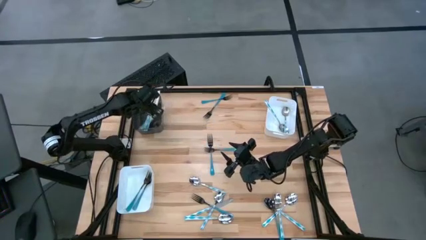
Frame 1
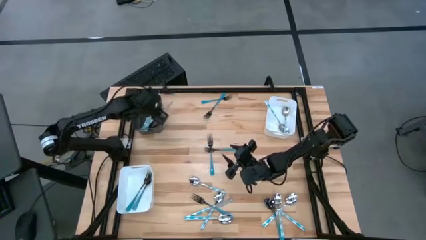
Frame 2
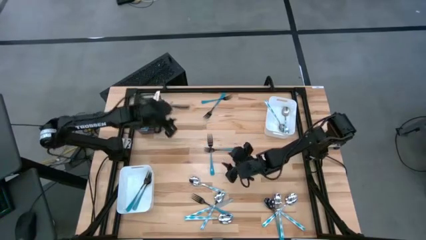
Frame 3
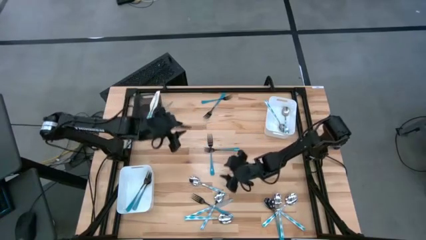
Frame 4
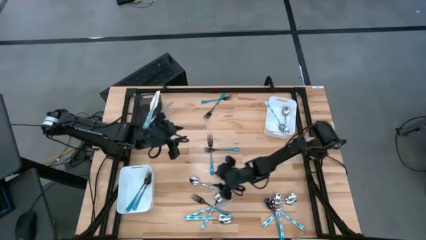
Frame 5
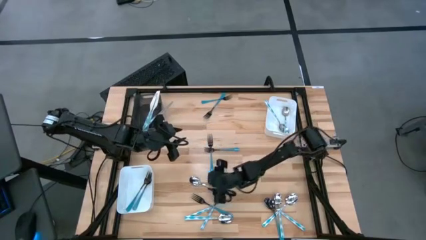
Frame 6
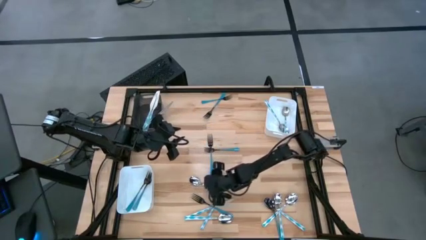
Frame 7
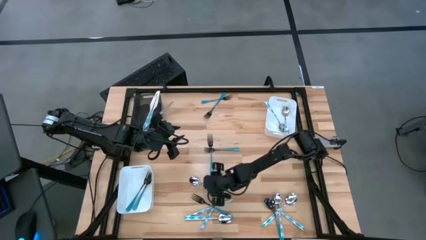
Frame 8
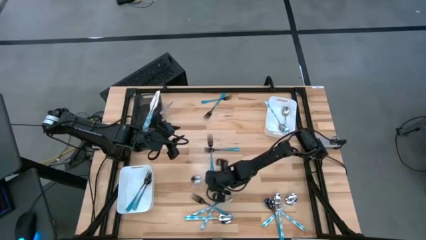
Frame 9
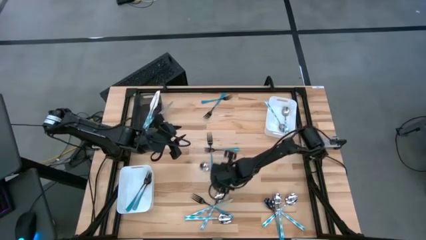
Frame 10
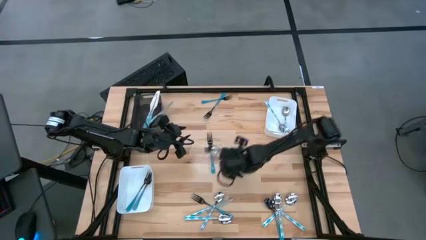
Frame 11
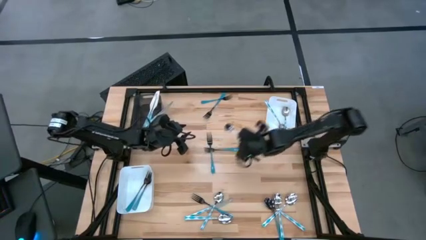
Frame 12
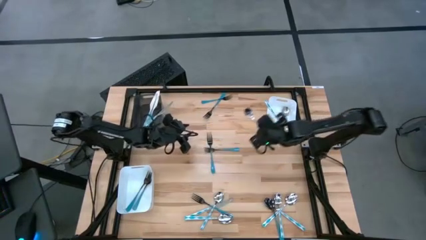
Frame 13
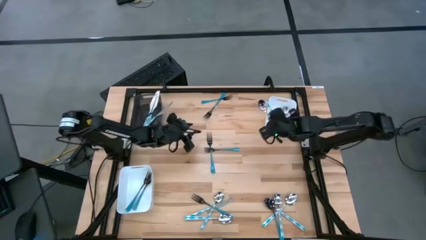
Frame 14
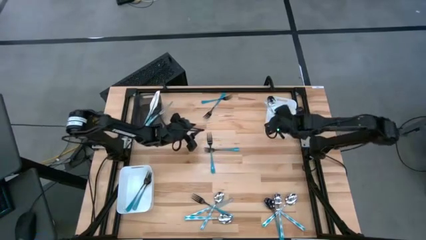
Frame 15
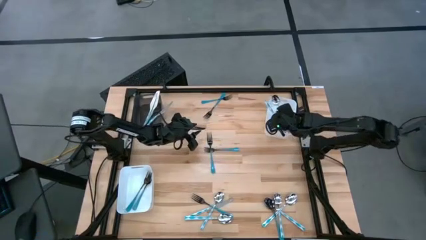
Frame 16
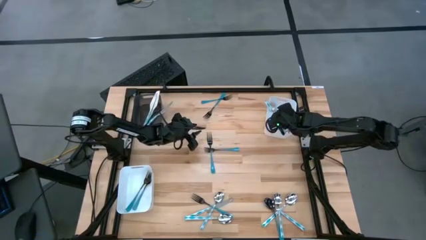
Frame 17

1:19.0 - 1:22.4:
Task: Sort silverware by color (type)
Put the blue white spoon into the right white bin

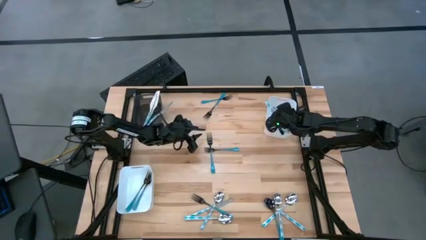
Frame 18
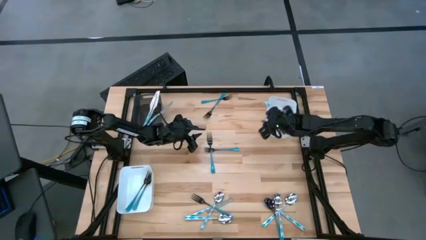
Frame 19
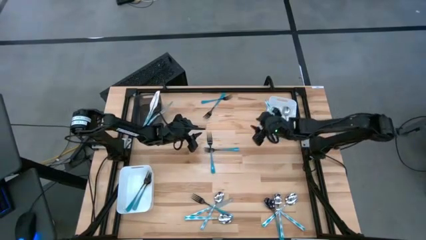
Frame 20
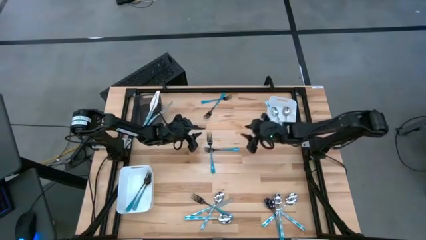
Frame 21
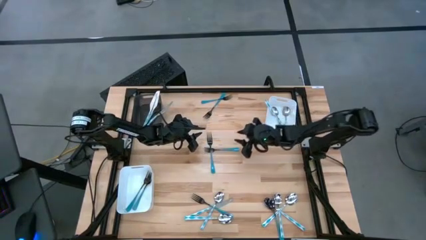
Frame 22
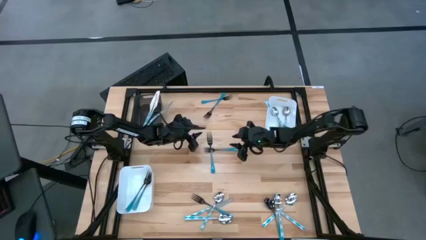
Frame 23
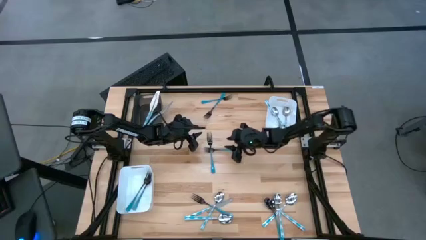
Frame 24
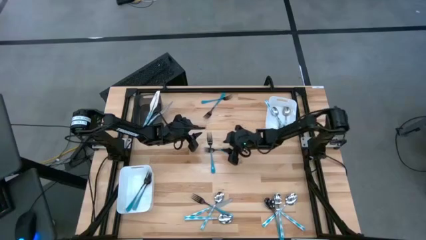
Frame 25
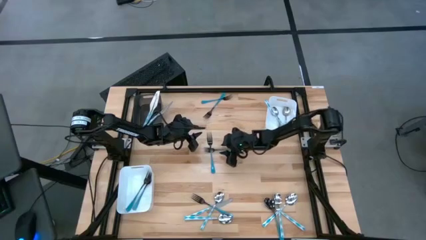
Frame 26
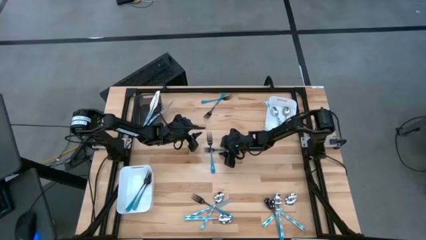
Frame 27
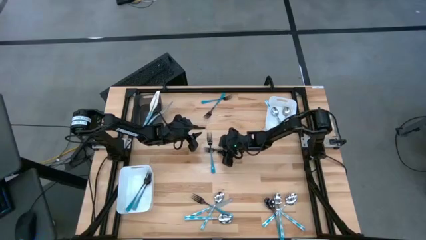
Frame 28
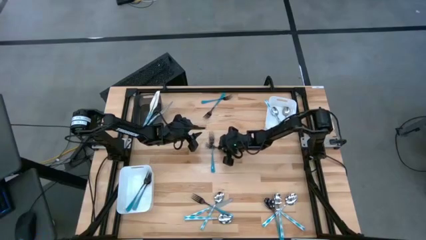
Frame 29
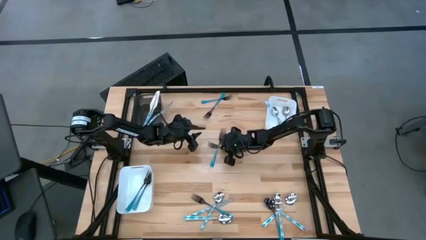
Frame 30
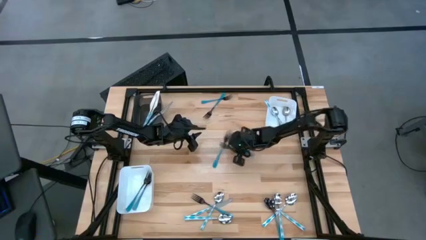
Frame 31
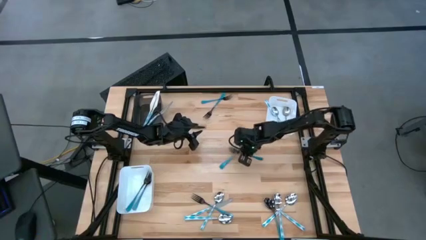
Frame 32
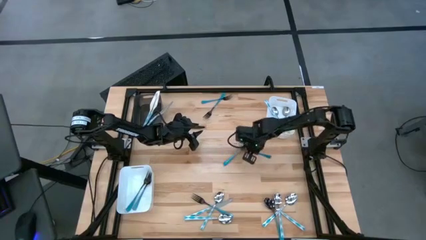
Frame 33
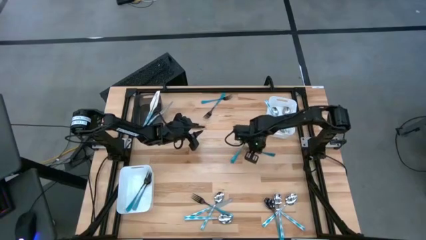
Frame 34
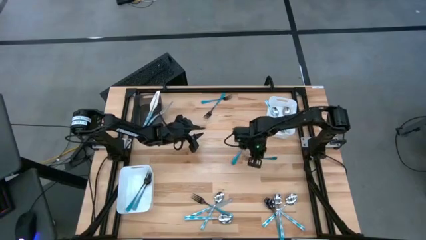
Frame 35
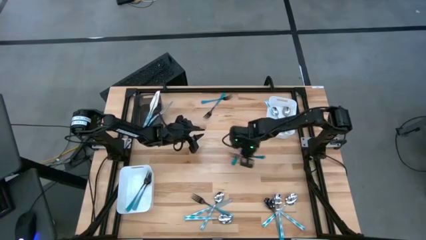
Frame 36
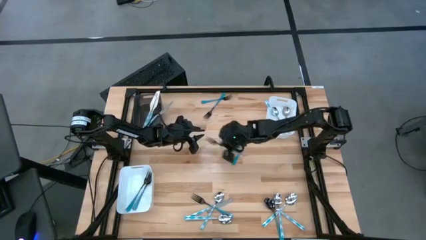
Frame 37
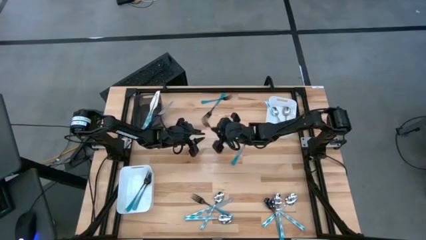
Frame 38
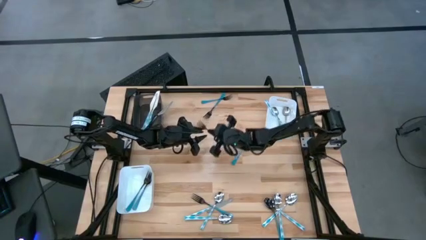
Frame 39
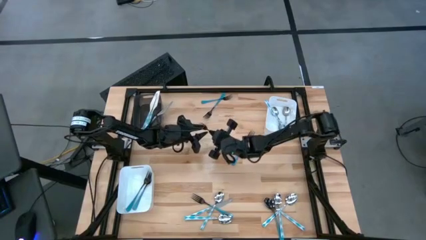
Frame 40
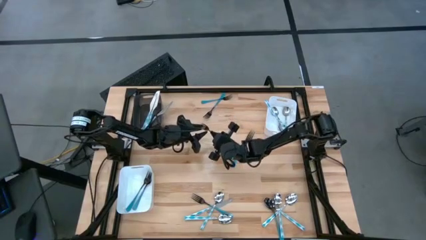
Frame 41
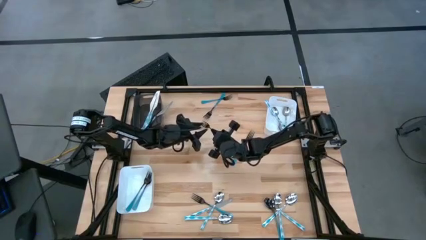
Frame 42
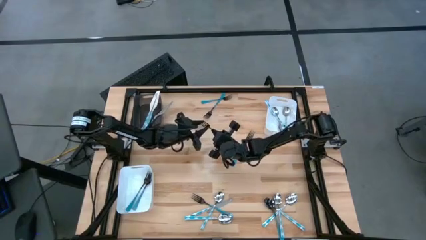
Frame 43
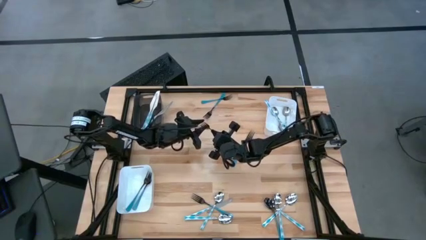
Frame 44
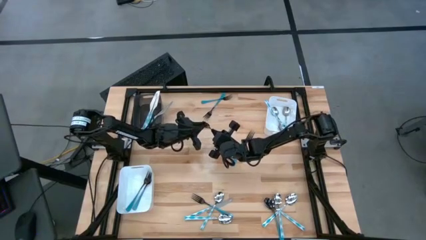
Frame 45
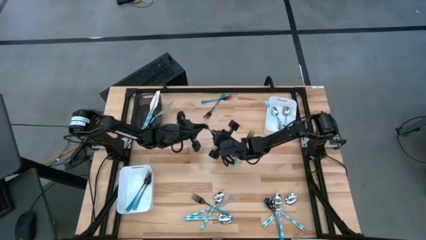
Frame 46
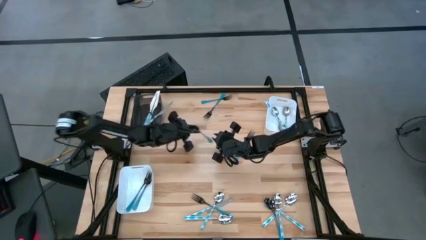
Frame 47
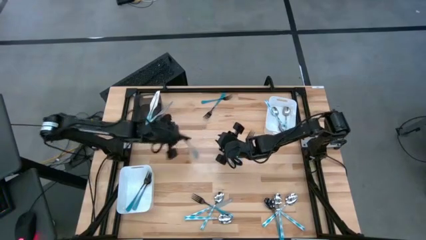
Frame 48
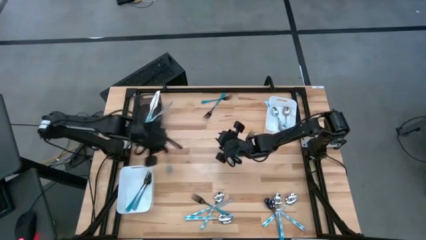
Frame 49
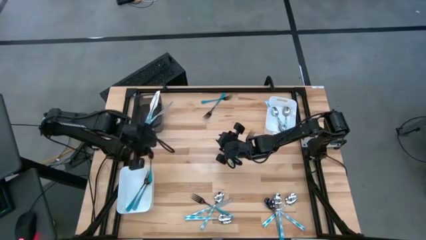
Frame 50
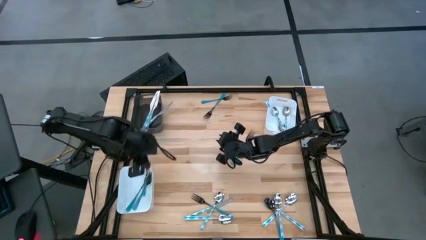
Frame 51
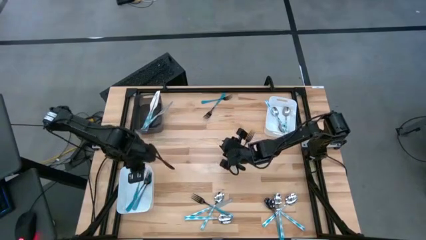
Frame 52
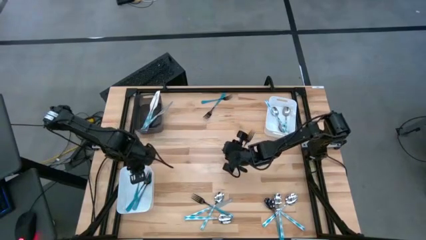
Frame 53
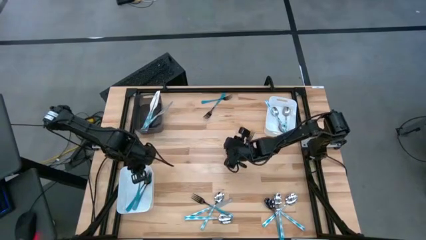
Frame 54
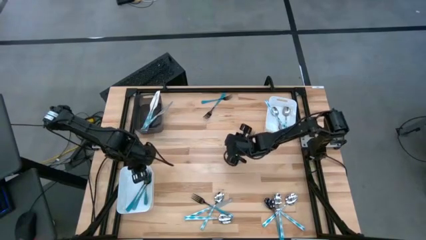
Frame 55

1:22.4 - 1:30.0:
Put the blue fork into the left white bin

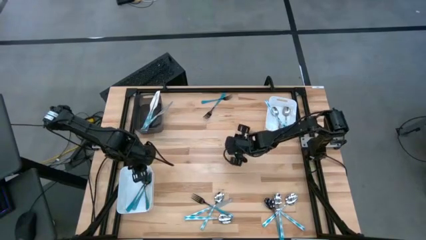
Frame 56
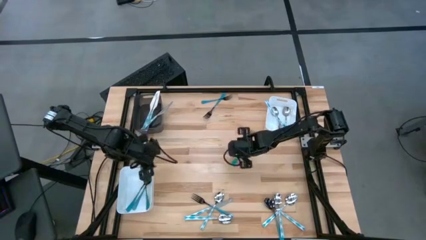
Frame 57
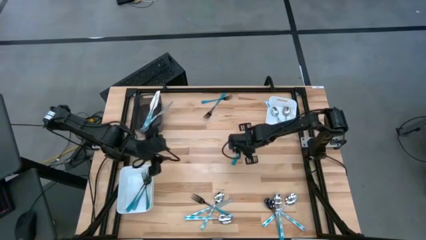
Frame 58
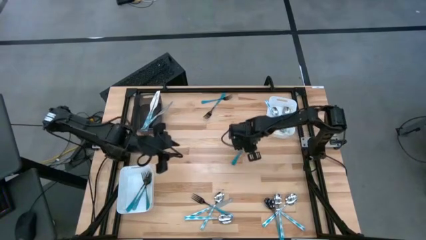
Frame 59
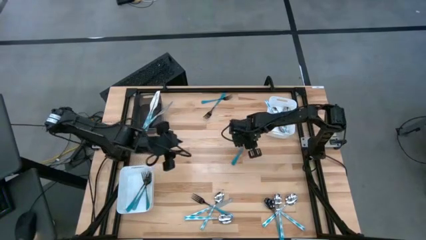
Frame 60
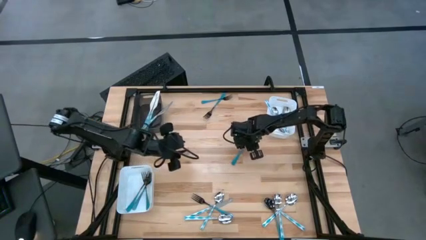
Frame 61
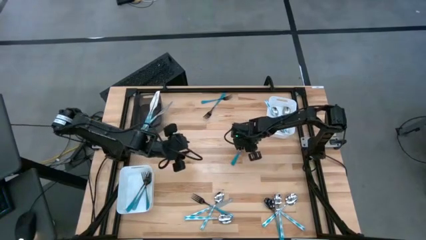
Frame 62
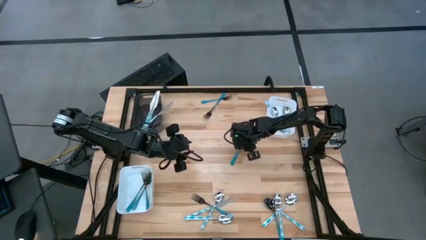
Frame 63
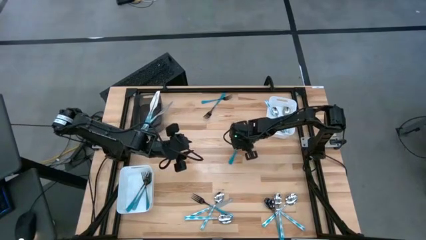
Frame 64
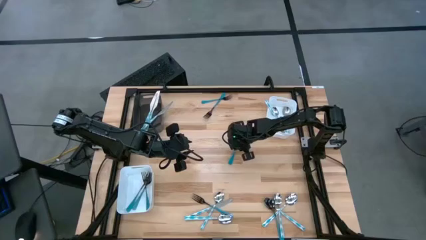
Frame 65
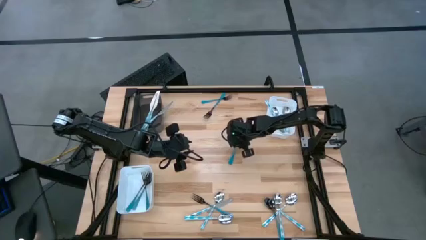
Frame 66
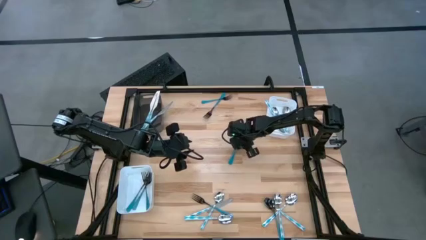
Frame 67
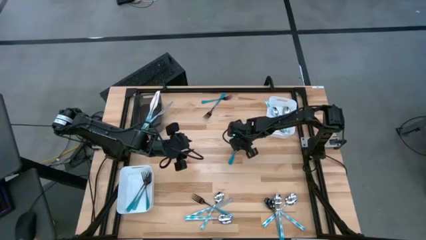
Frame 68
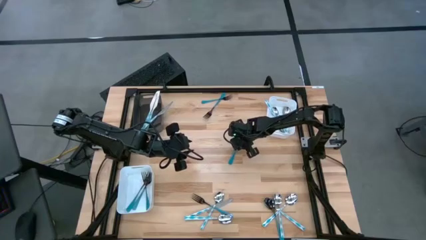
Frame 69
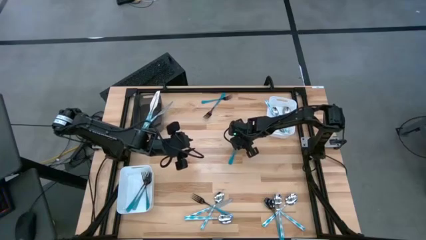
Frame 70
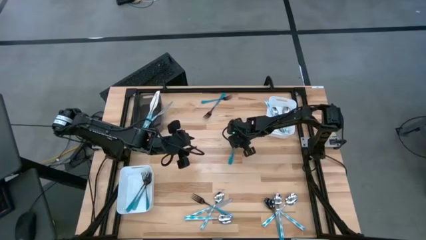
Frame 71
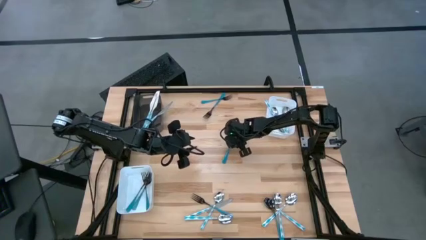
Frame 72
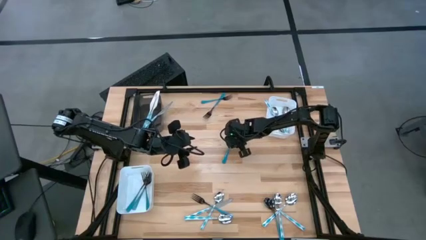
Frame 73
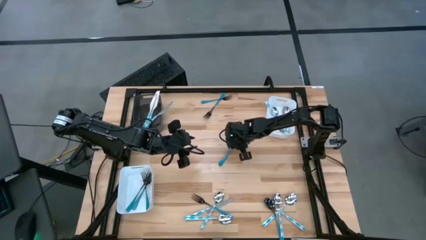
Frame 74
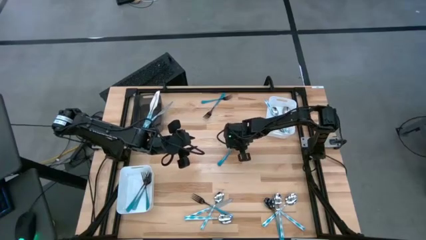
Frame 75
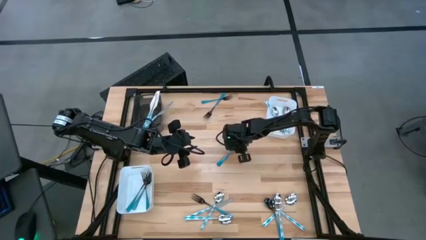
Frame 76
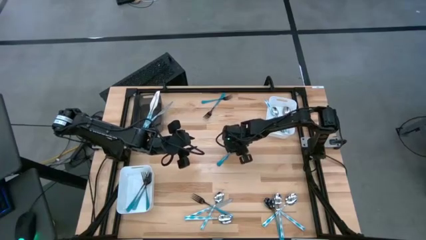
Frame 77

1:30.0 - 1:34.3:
Put the blue fork into the left white bin

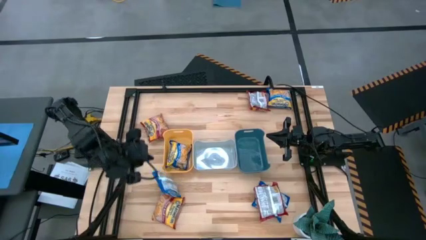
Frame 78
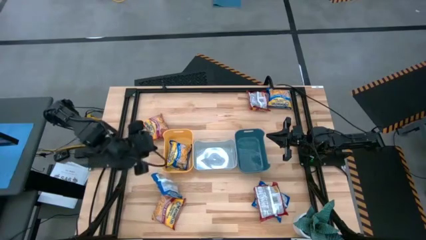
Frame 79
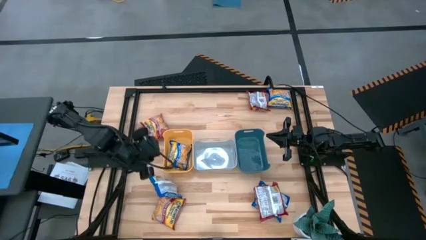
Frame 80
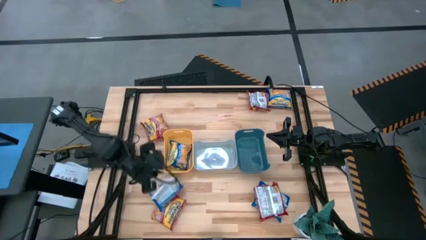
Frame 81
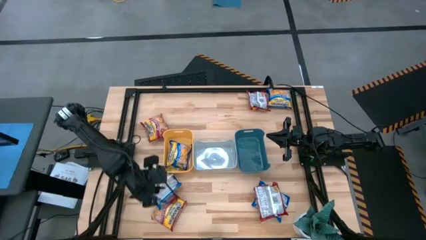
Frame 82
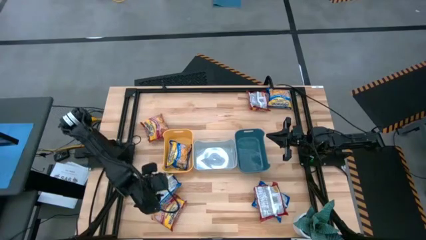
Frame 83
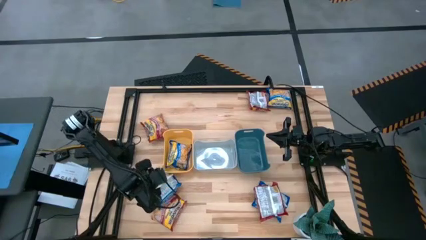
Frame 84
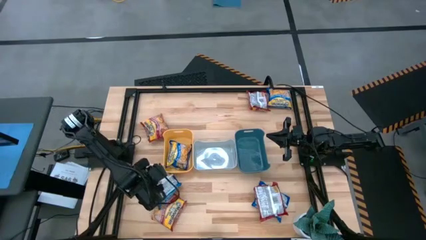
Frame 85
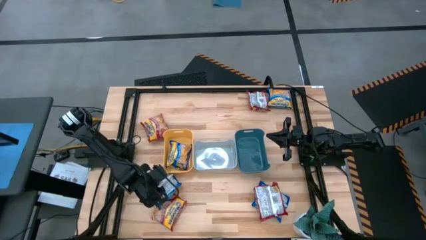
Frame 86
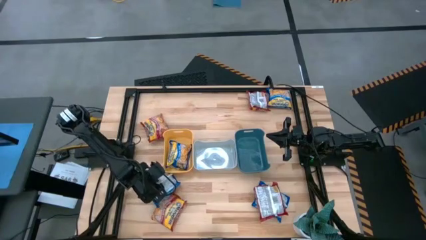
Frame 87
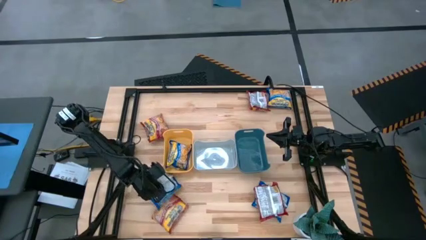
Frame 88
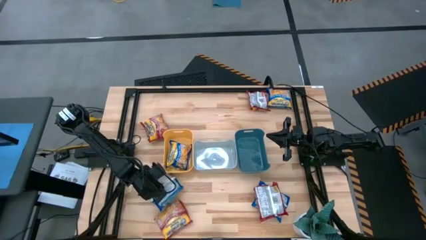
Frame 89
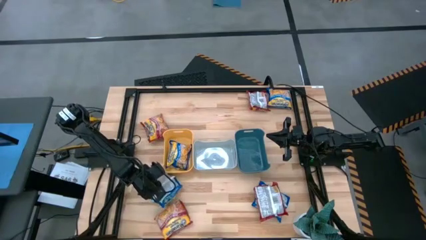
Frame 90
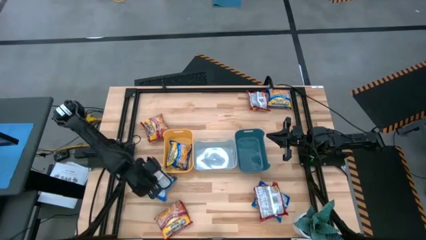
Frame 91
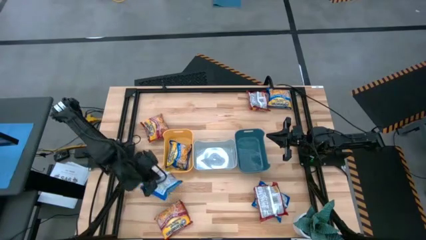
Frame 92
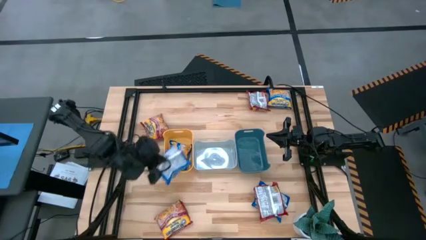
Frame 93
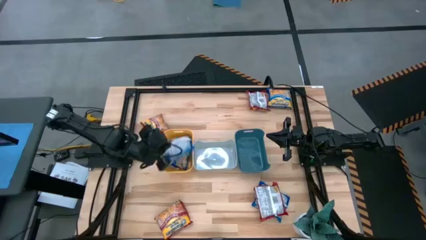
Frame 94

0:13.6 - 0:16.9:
Task: Sort Maruchan noodles
Put the bottom left blue noodle pack into the yellow bin
